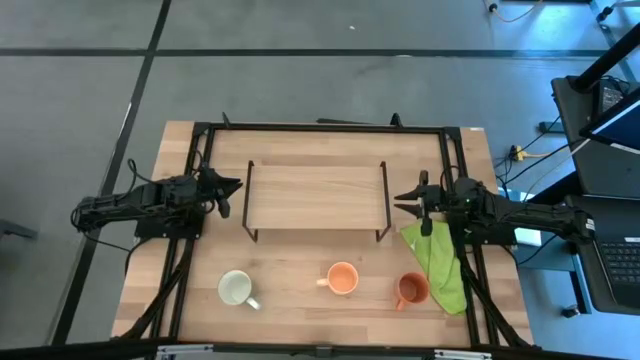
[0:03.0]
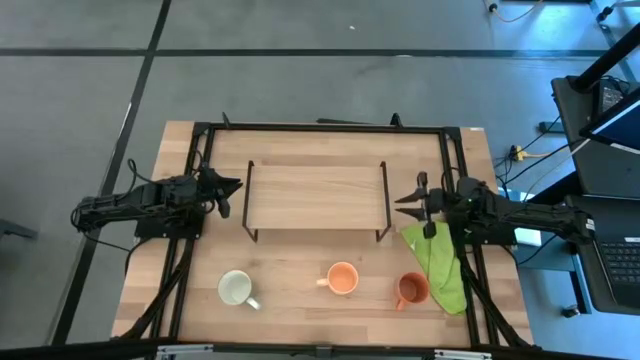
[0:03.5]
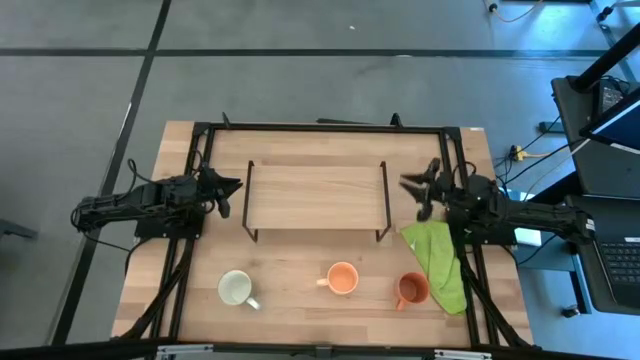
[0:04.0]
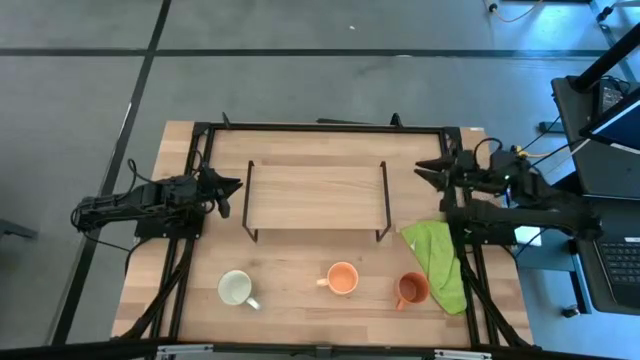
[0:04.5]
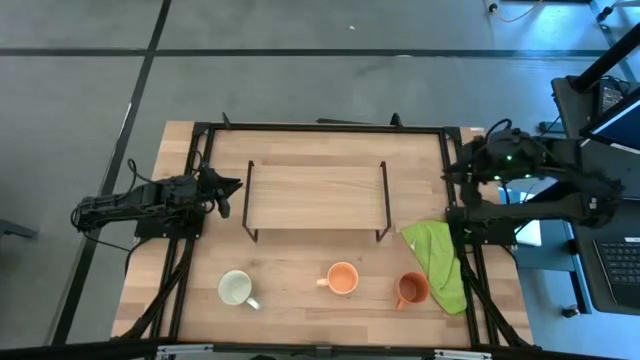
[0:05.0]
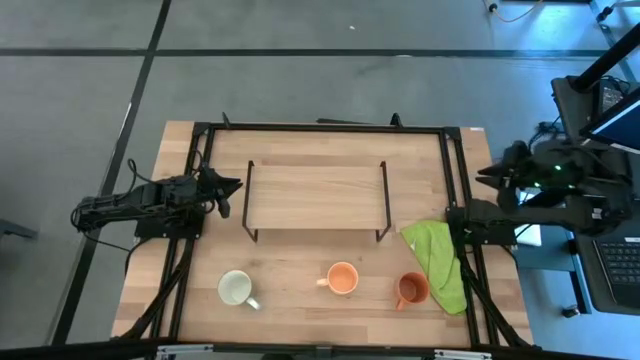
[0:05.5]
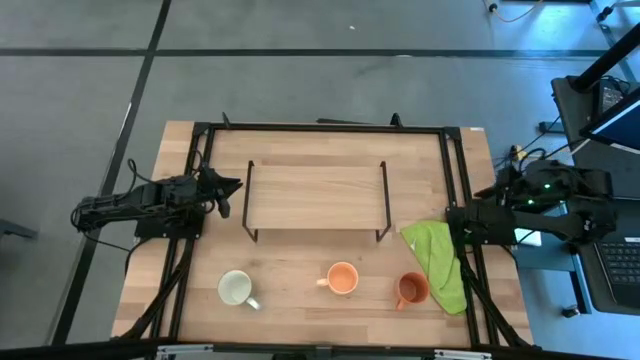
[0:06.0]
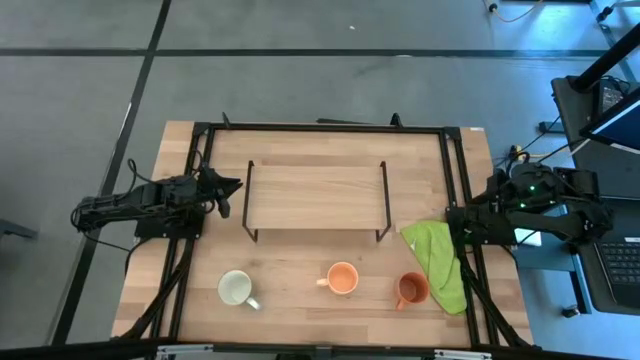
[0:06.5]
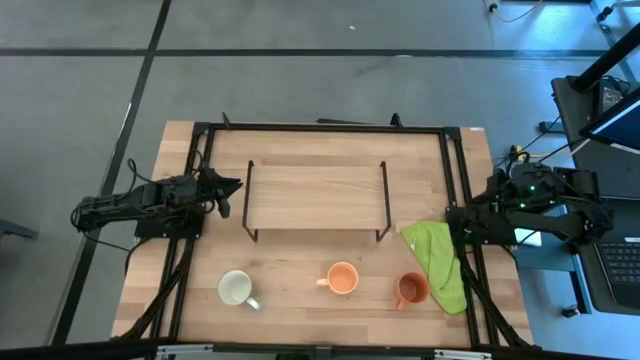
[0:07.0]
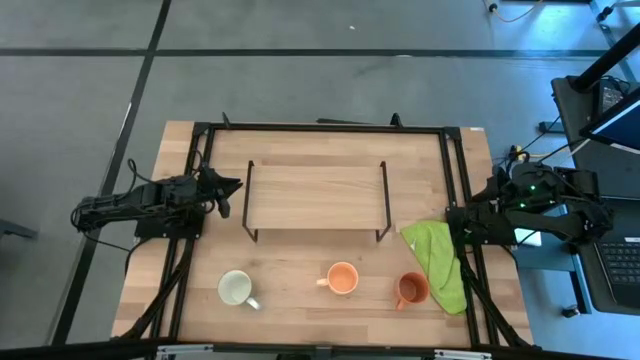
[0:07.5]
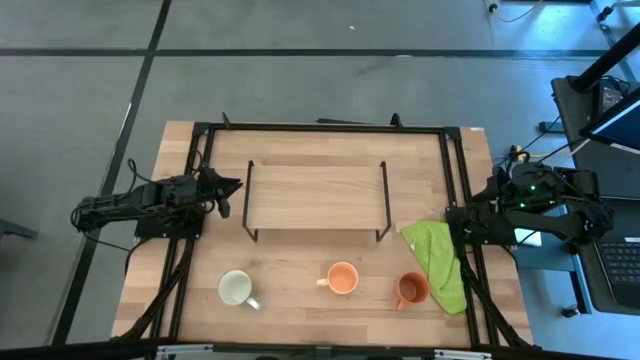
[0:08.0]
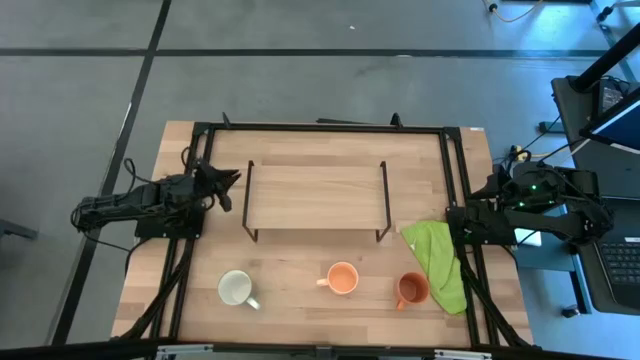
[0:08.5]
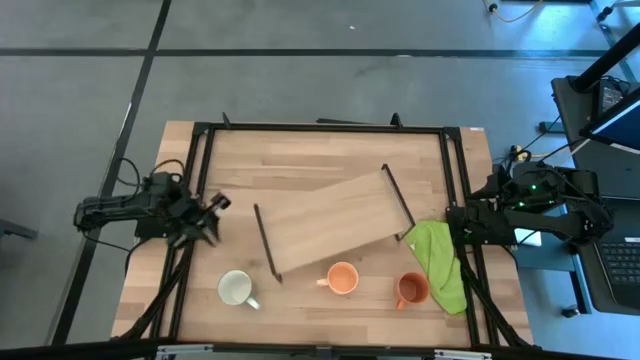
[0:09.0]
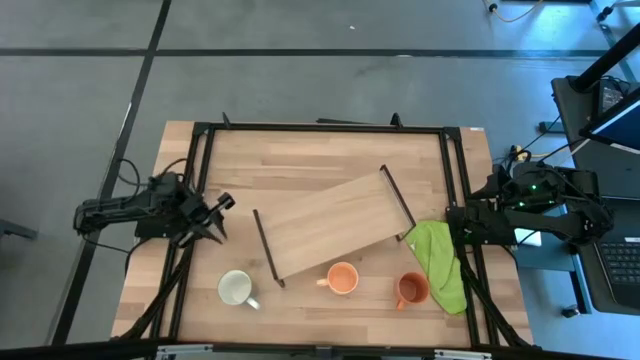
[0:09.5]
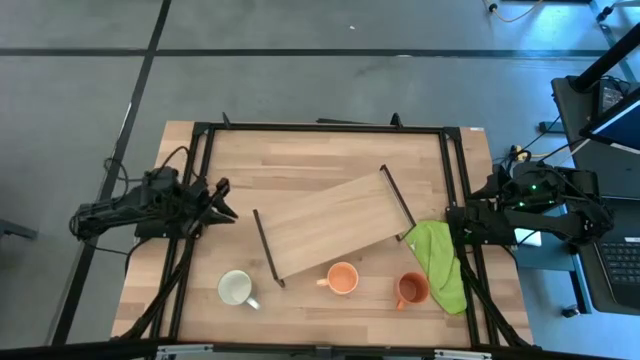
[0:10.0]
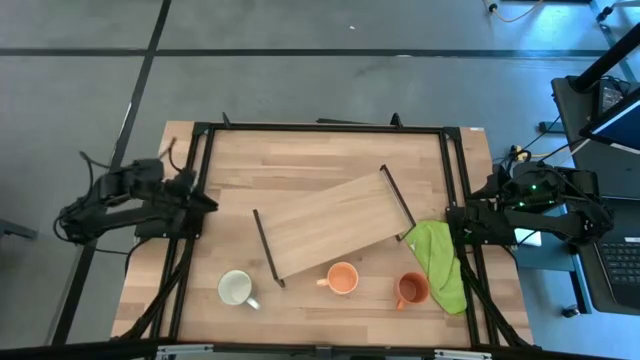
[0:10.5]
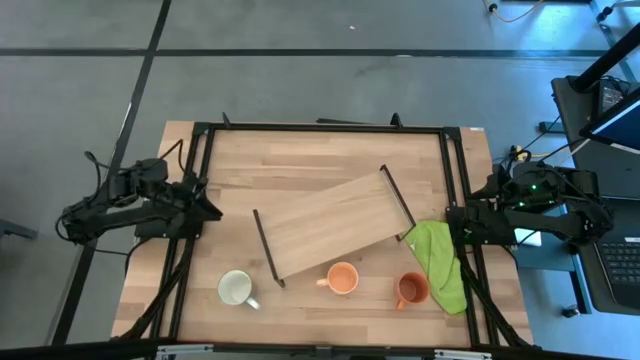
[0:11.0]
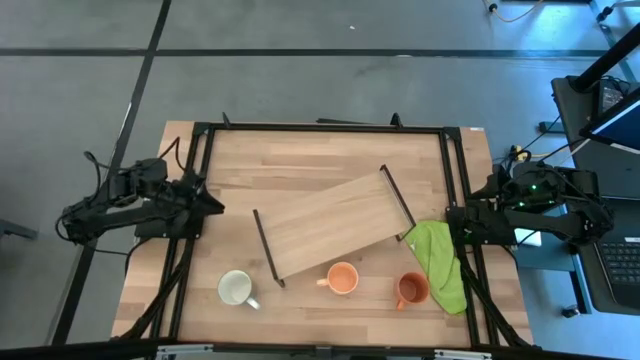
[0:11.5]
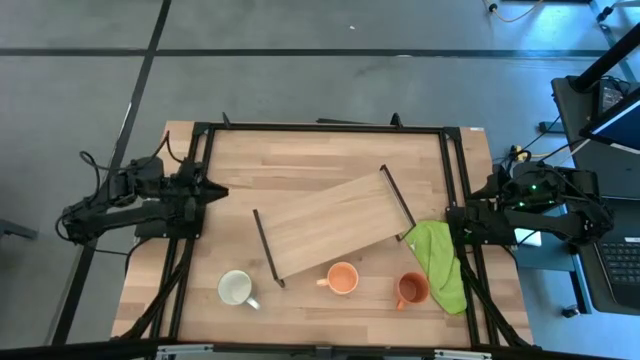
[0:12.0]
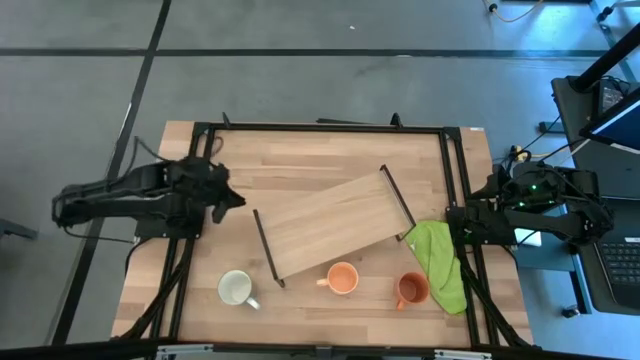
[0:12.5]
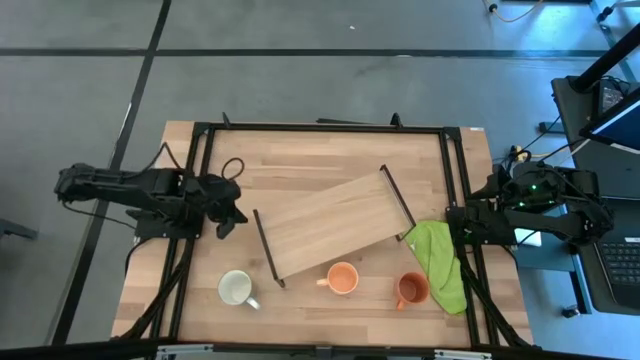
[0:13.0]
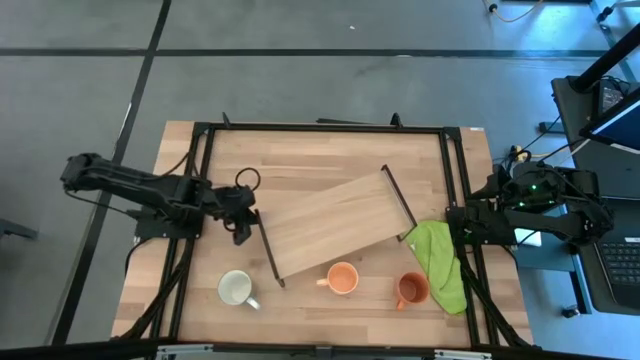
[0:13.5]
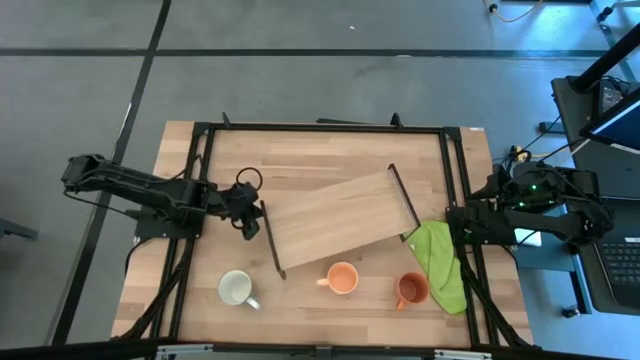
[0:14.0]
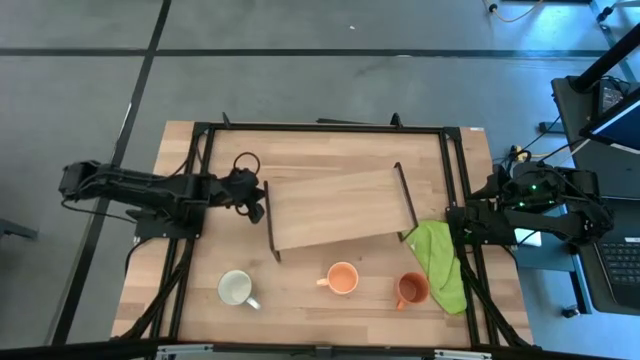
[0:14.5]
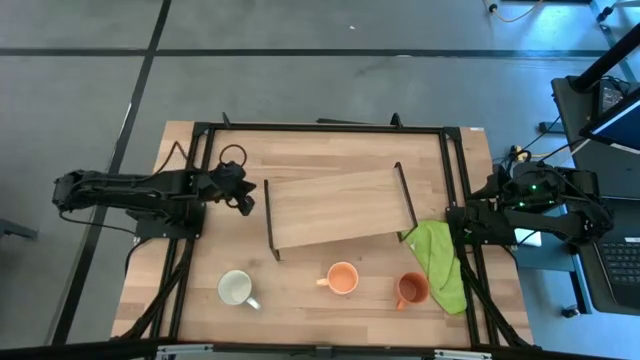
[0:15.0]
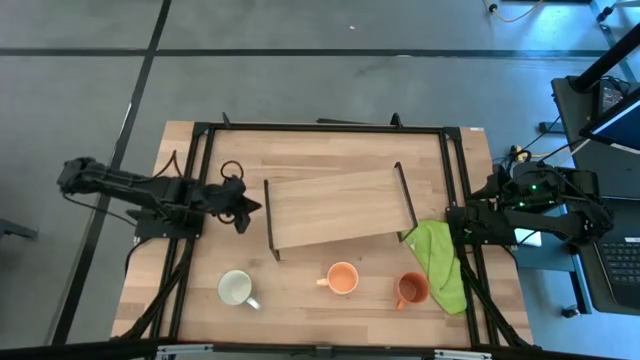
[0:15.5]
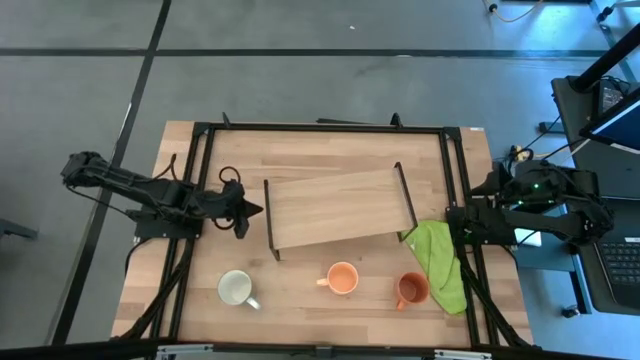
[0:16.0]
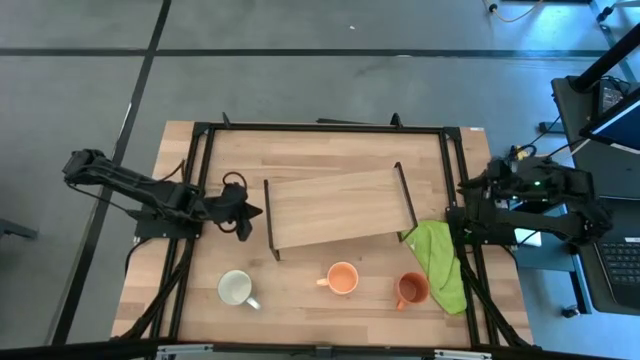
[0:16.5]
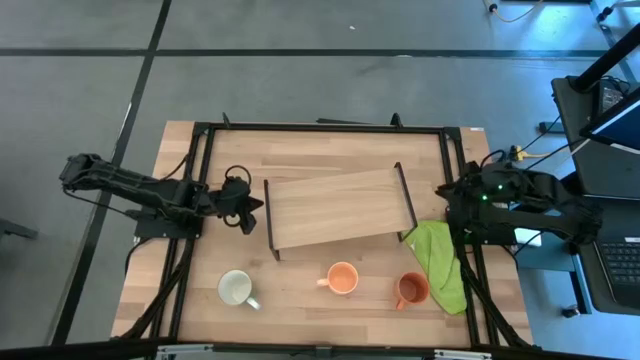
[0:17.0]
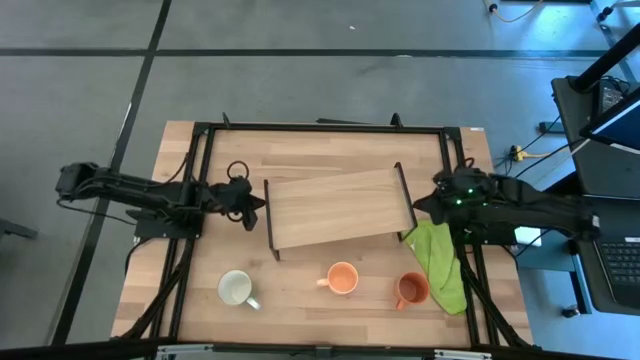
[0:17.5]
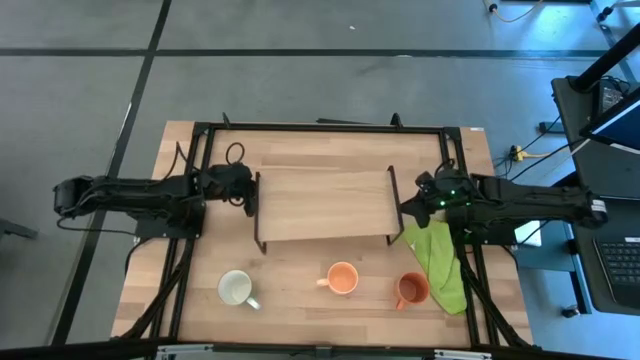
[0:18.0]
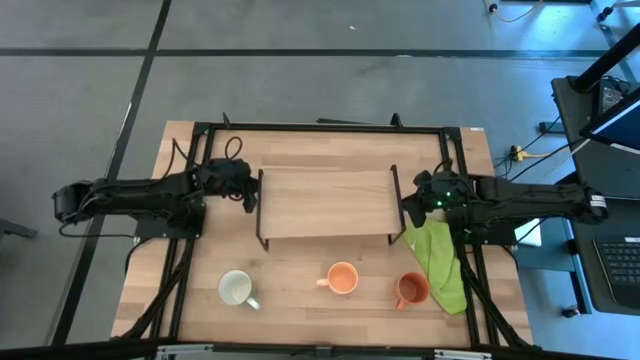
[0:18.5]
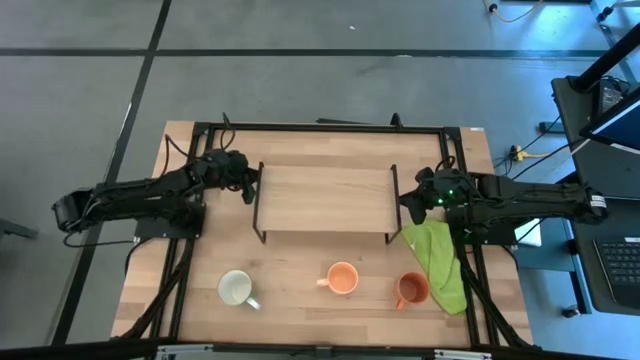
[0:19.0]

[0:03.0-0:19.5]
Task: Stack small to large cups/mugs on shelf
Adjust the shelf
